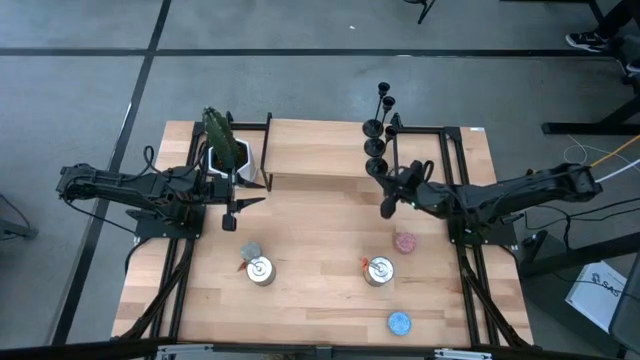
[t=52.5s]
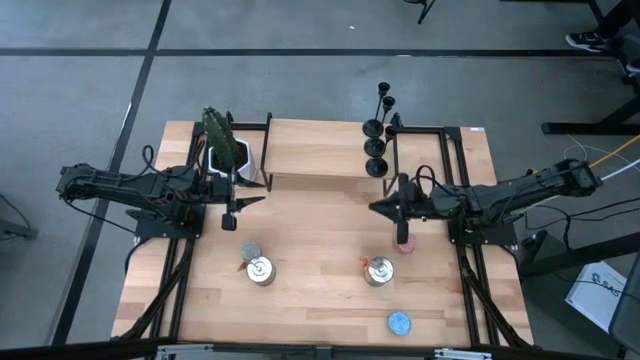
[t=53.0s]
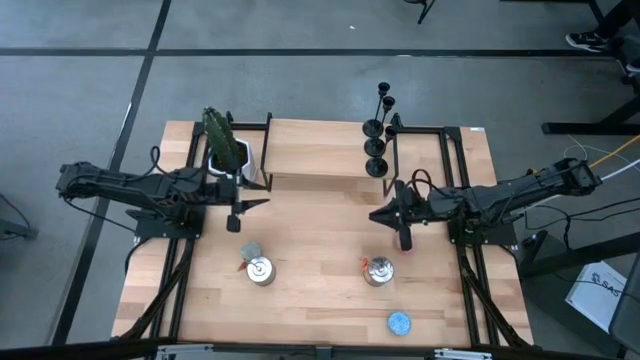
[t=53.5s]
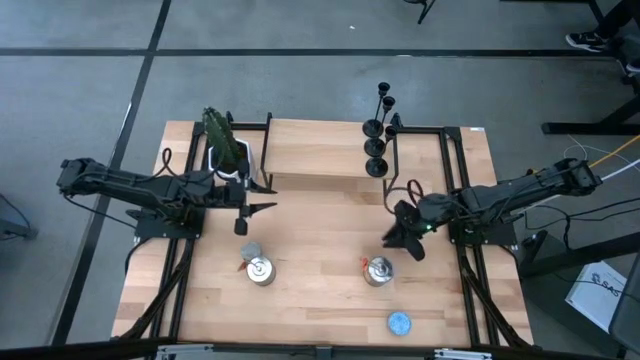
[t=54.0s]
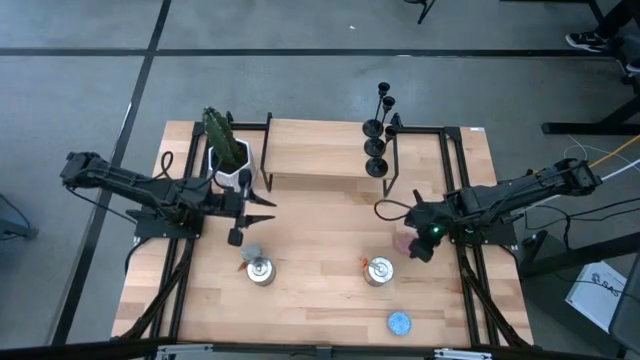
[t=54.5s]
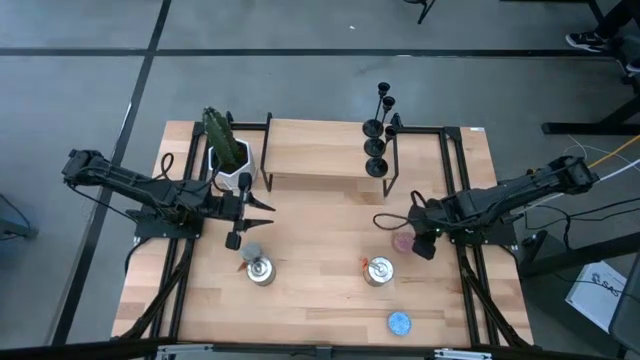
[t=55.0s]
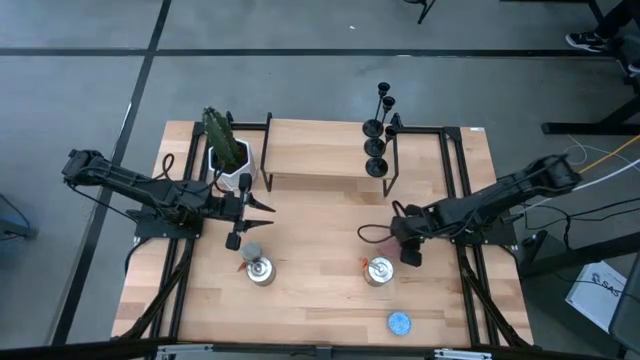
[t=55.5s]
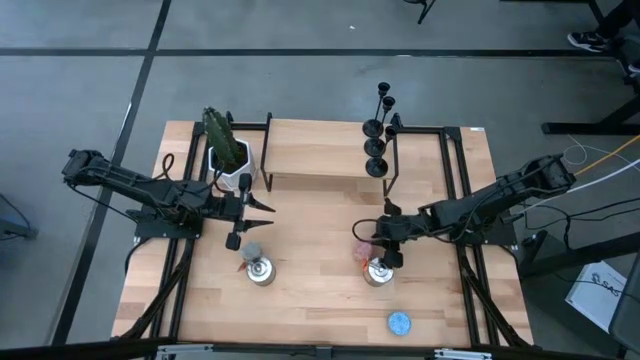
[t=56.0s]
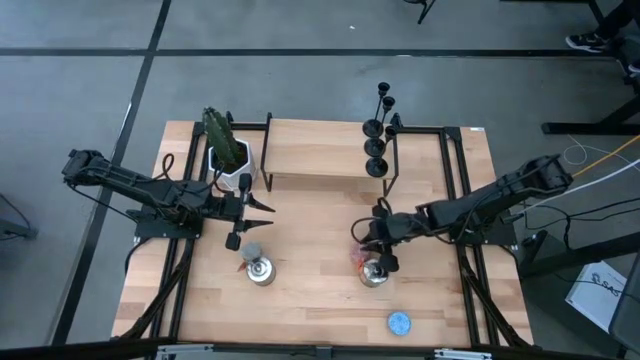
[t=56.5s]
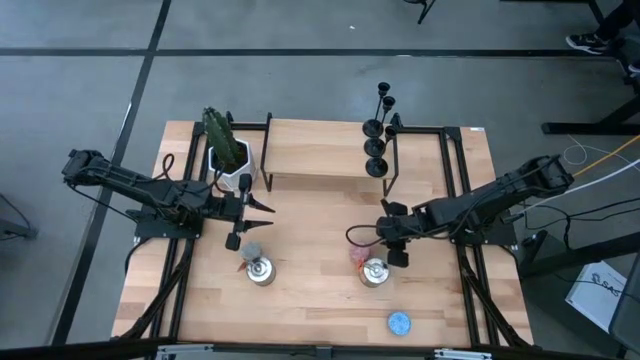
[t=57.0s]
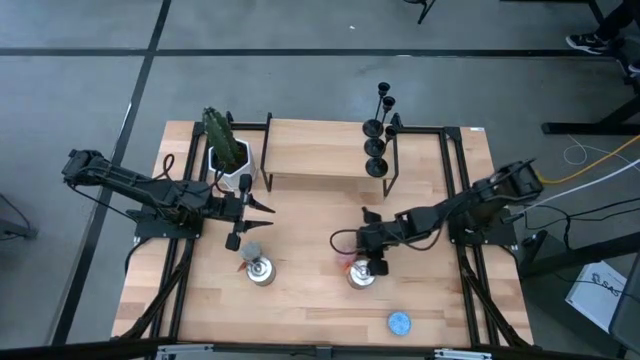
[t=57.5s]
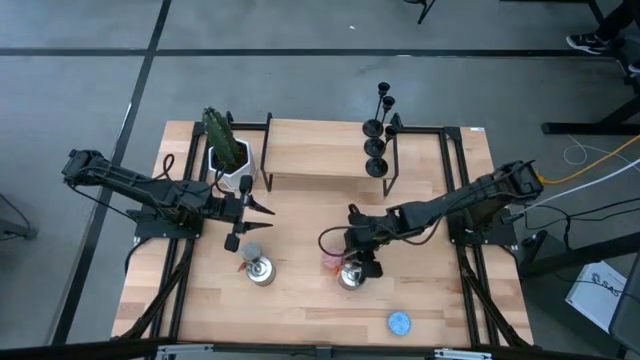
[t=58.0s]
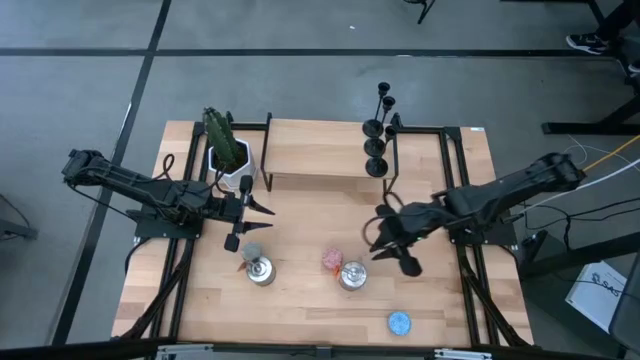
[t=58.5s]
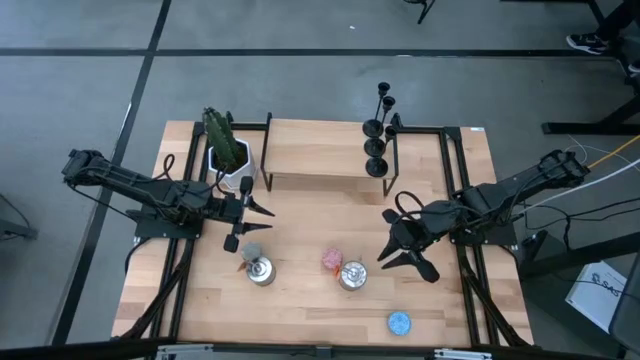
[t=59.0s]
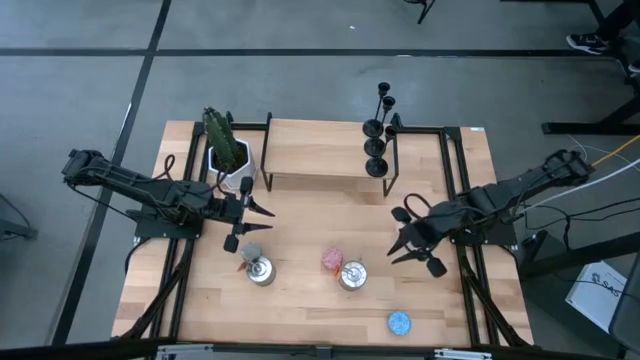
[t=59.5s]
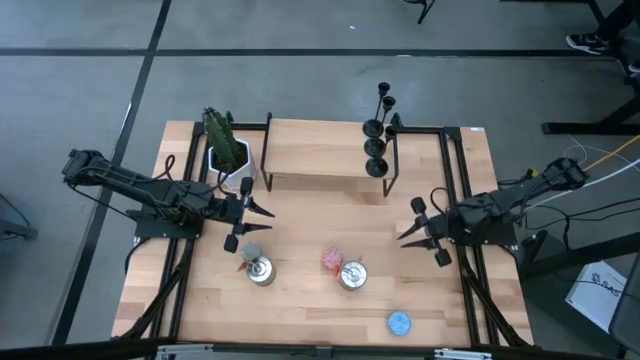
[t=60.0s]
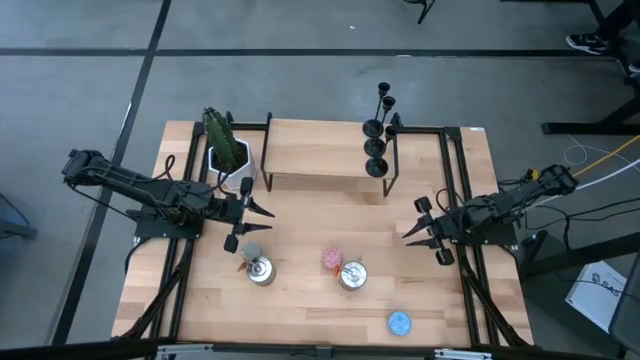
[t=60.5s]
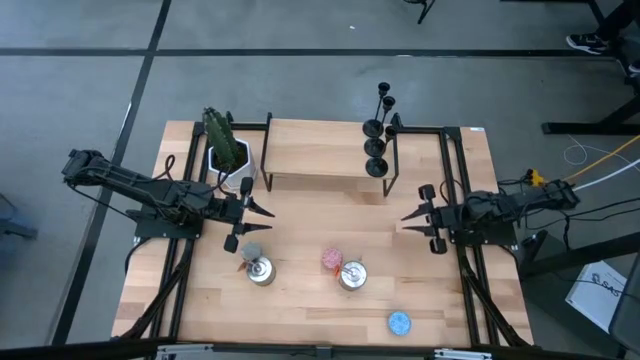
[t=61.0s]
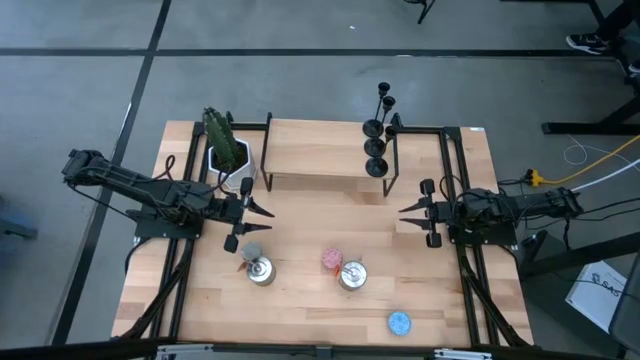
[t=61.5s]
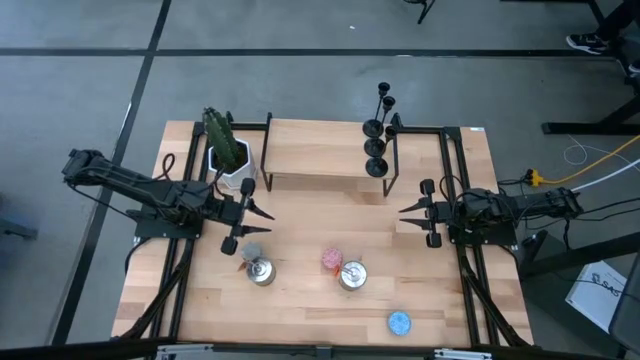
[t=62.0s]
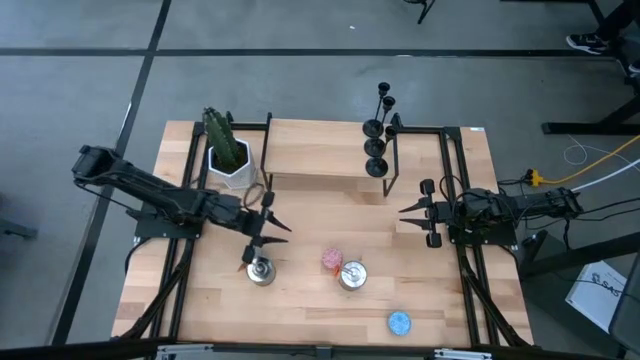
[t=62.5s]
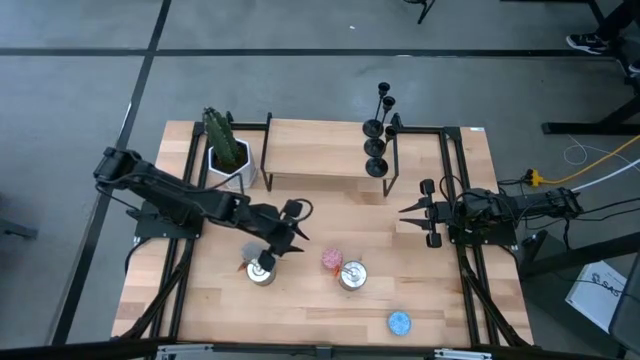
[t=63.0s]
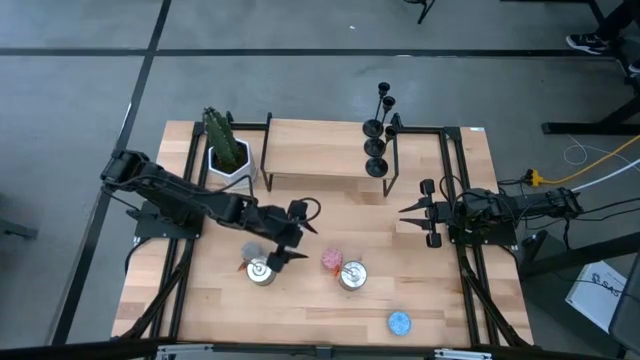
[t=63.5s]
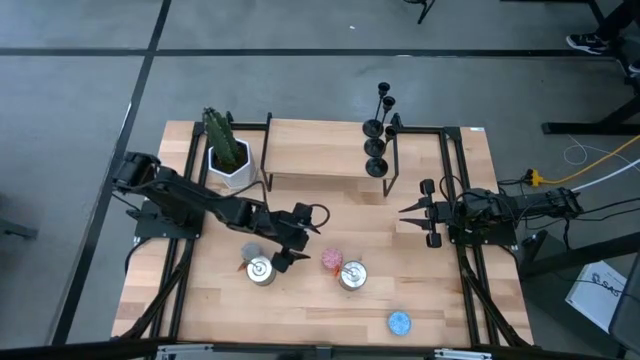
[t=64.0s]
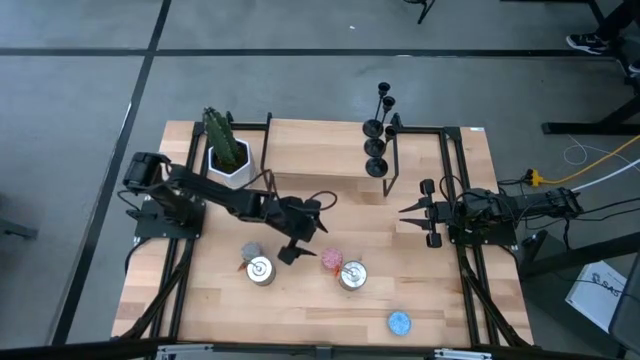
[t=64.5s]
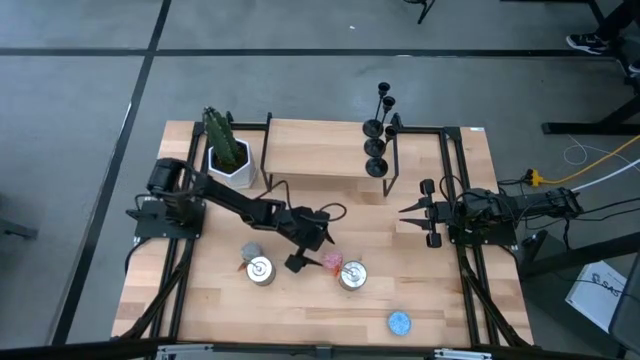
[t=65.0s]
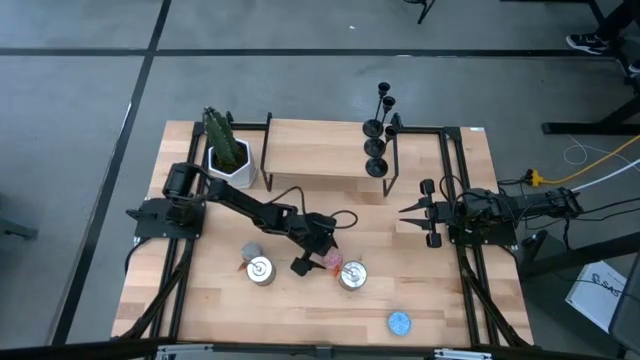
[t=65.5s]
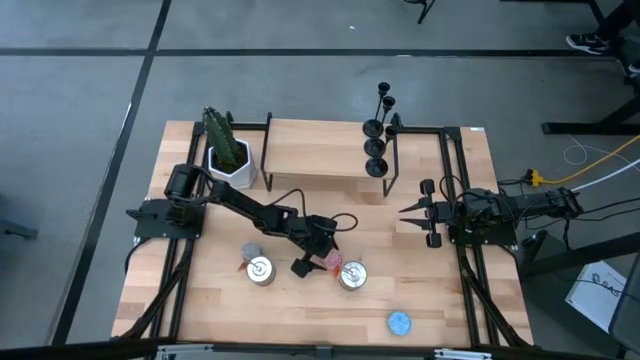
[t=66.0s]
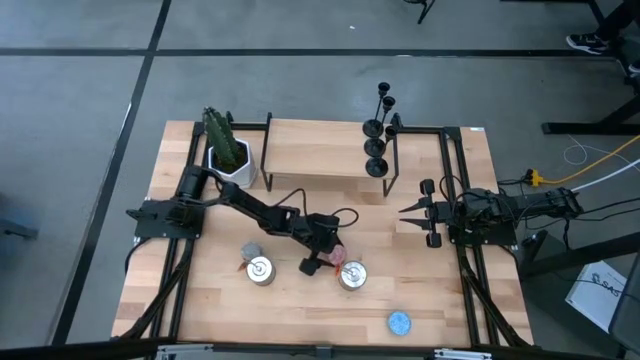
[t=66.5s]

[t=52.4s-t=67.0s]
Task: Pick & Place candle stick holders
Put the pink scented candle on the shelf

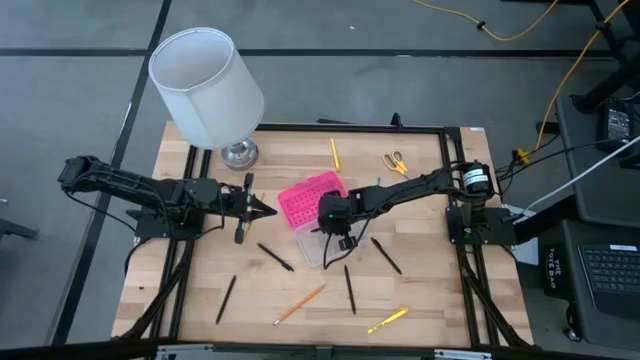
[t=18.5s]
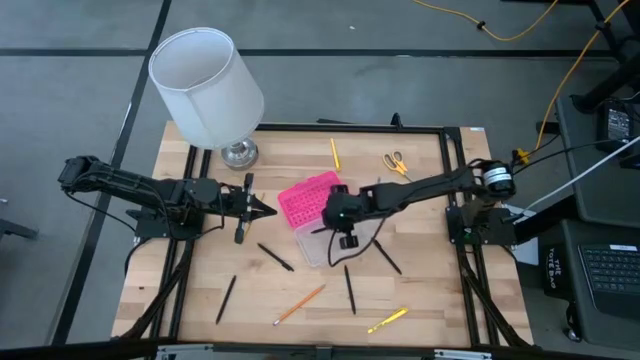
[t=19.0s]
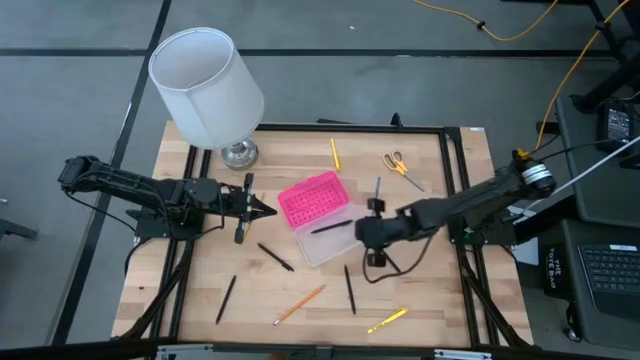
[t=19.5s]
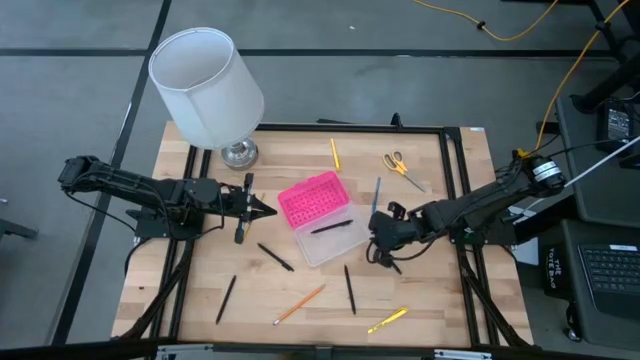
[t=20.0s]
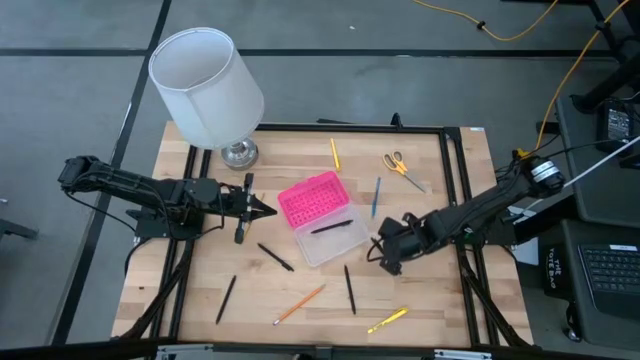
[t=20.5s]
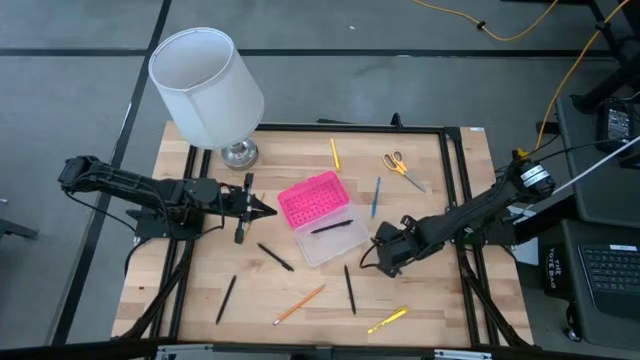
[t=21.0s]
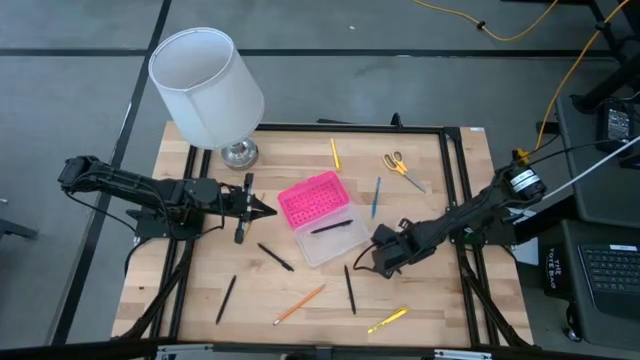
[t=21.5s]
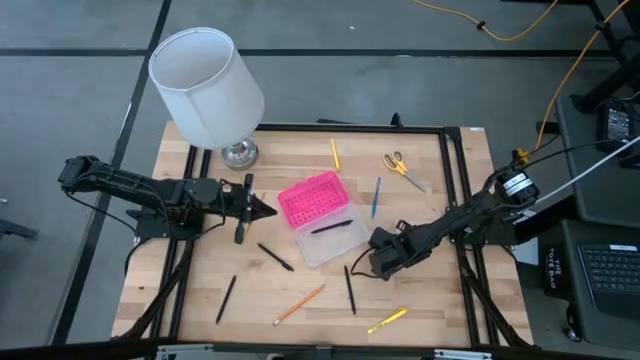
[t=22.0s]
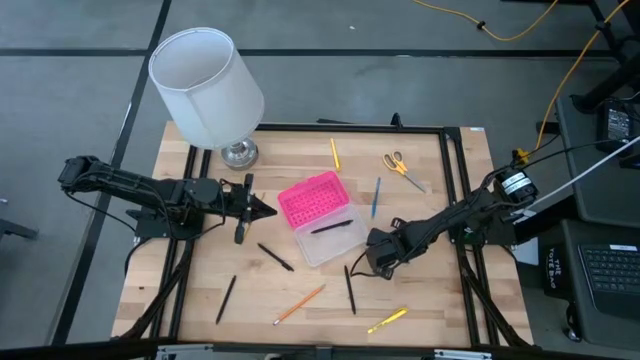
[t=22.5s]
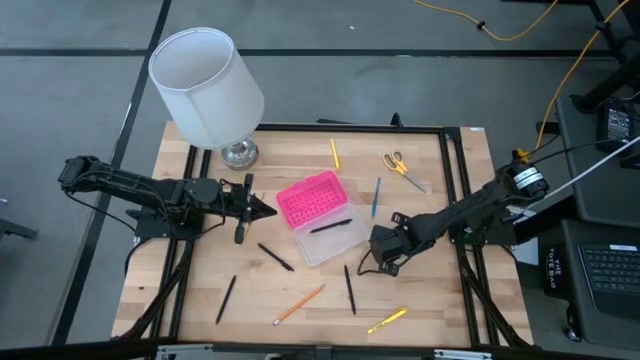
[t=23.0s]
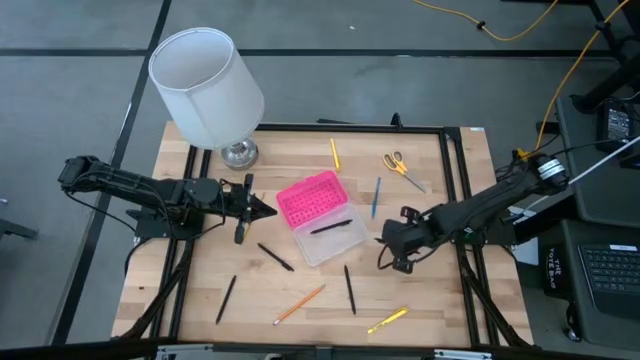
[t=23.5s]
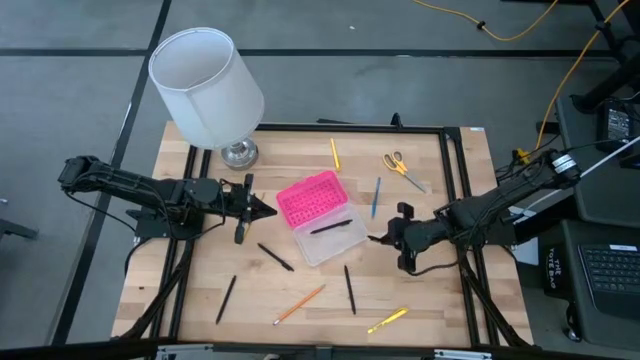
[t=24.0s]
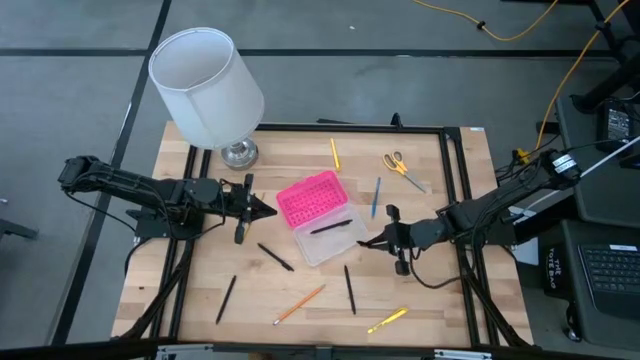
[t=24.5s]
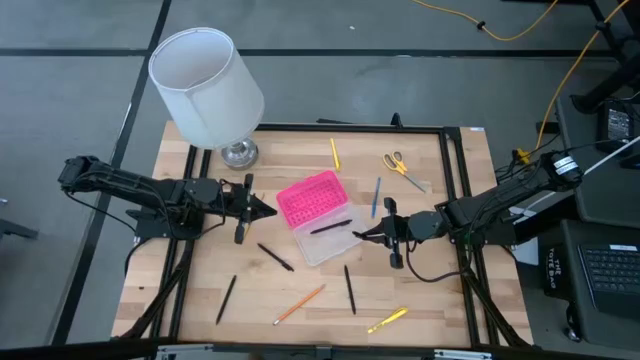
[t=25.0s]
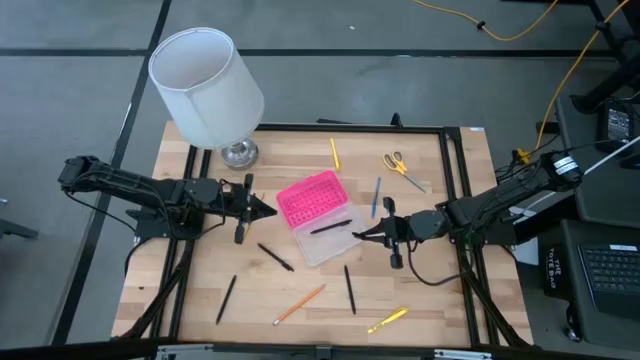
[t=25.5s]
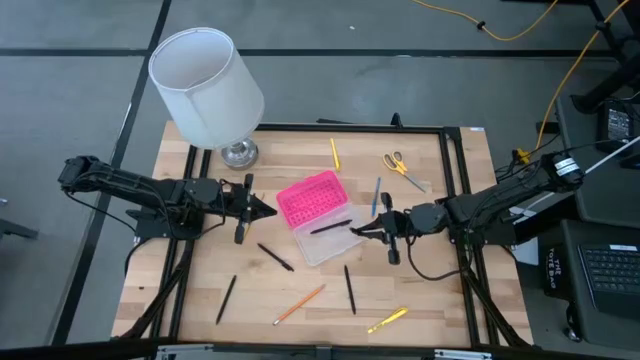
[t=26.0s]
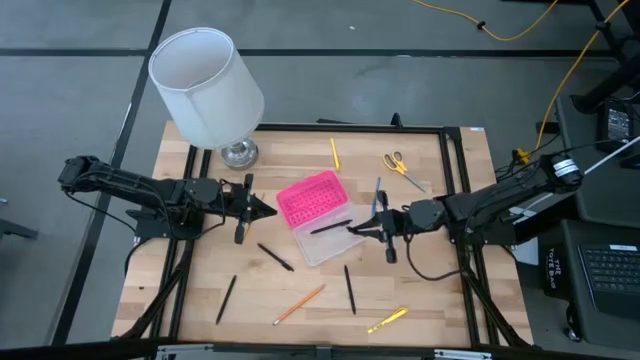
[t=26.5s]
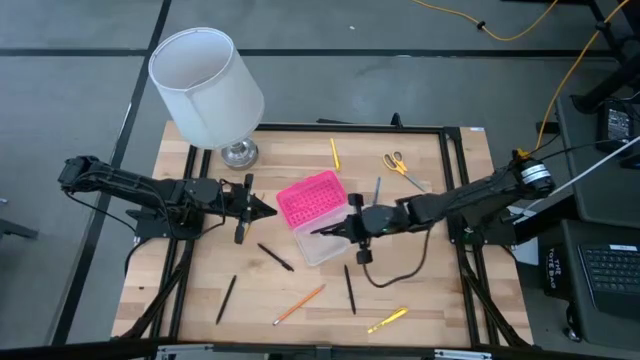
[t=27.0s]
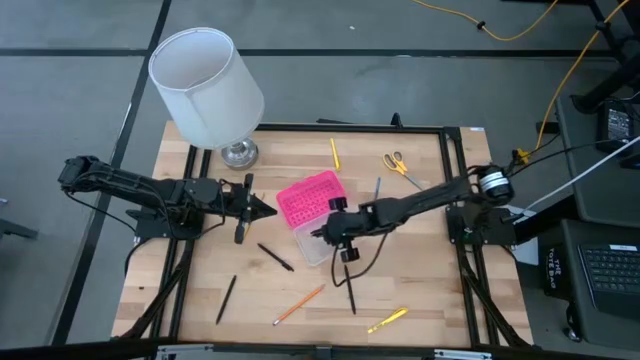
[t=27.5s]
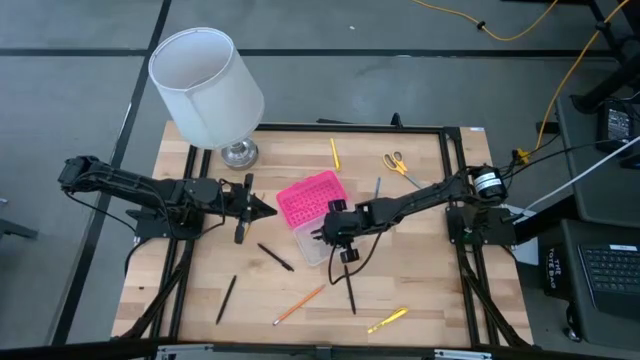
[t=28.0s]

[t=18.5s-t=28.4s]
Task: Pick & place school supplies into a supply box
Put the black pen into the supply box
